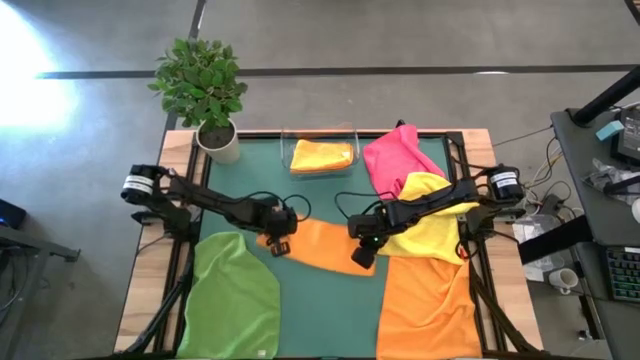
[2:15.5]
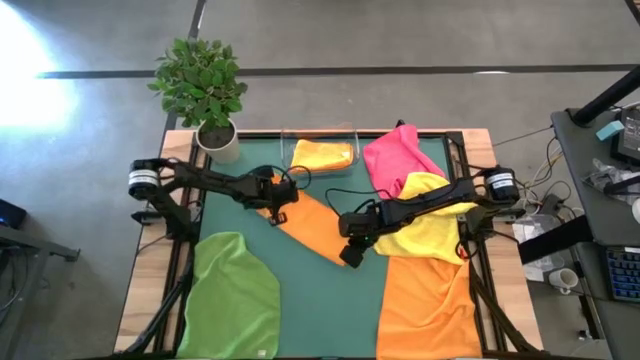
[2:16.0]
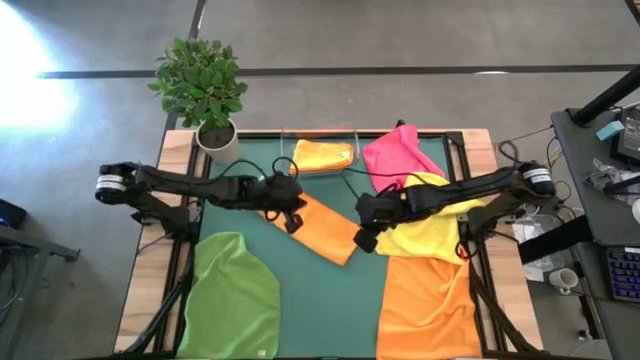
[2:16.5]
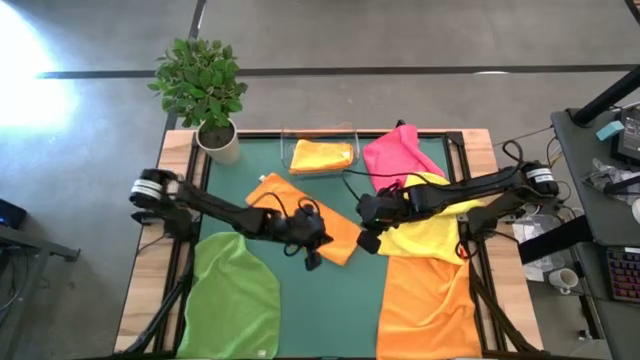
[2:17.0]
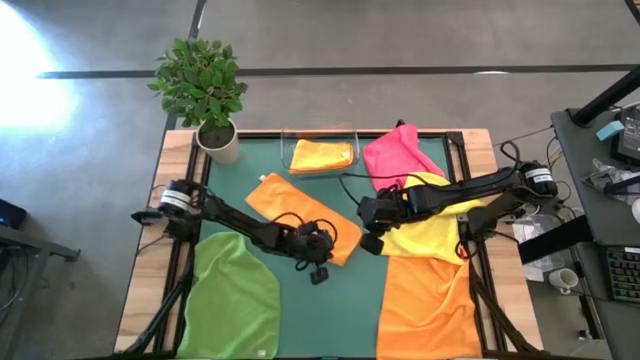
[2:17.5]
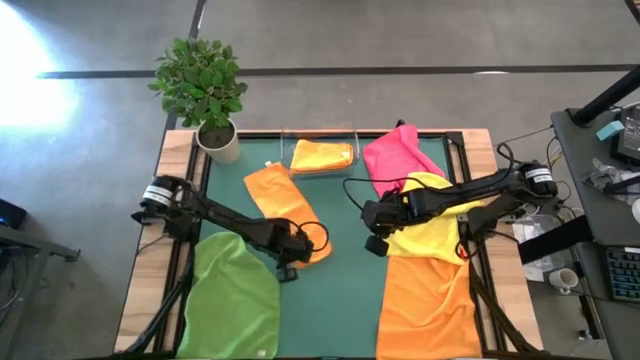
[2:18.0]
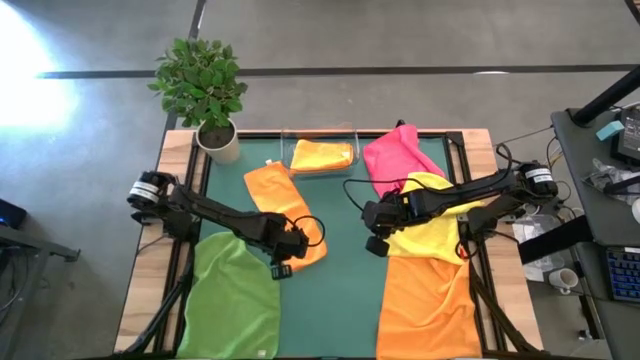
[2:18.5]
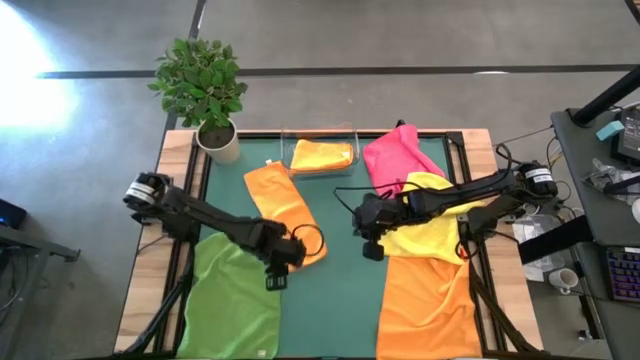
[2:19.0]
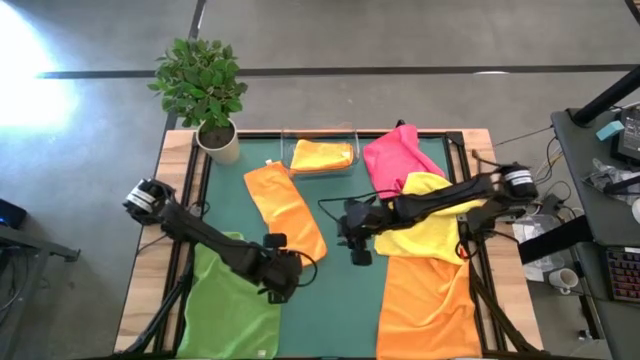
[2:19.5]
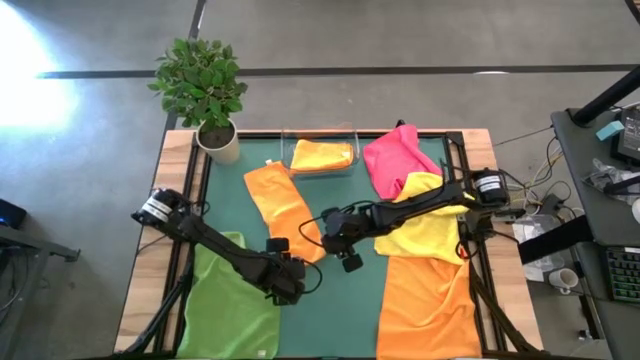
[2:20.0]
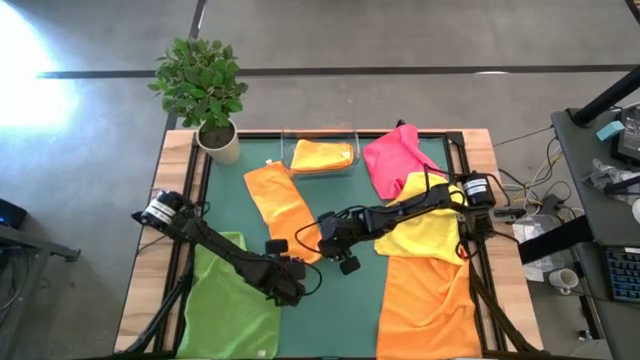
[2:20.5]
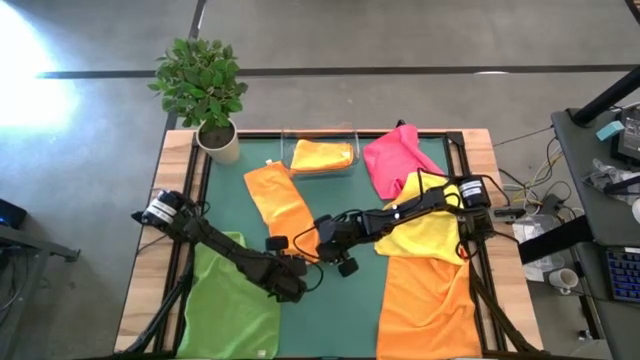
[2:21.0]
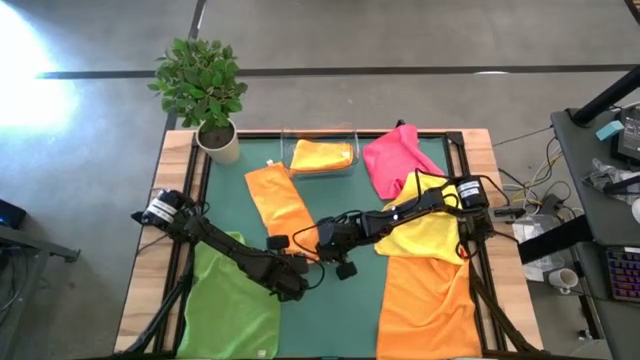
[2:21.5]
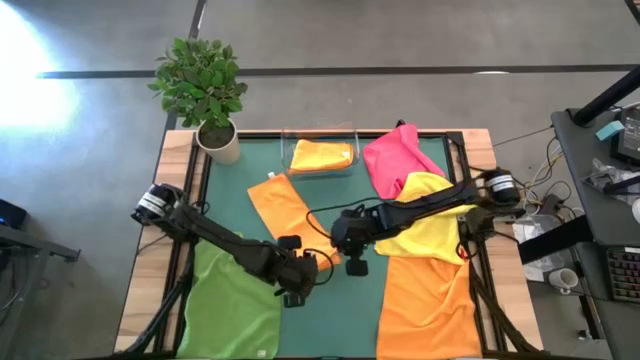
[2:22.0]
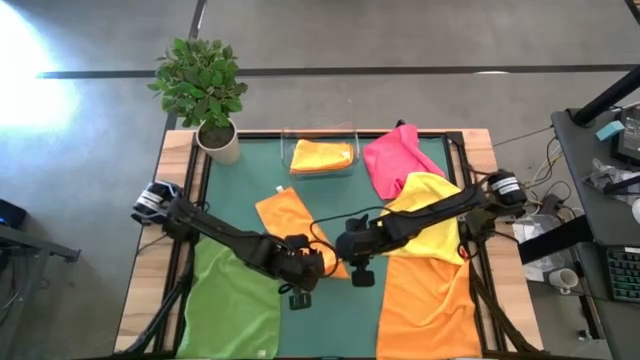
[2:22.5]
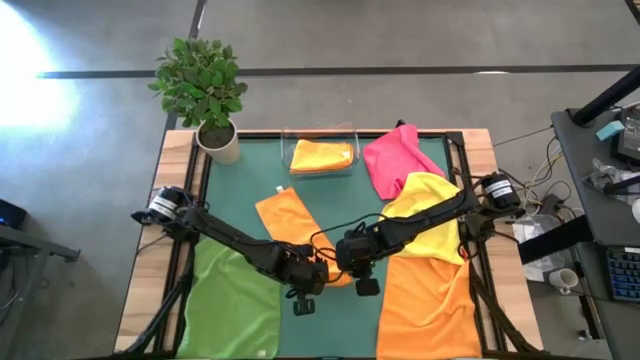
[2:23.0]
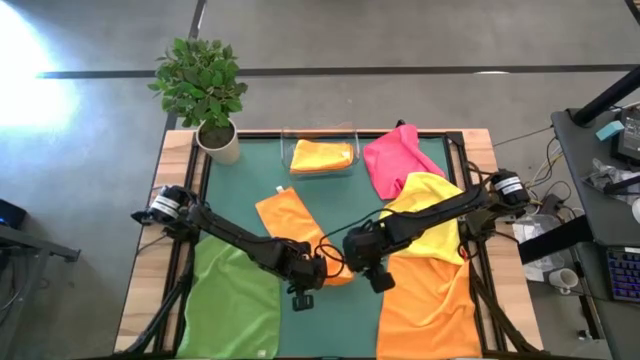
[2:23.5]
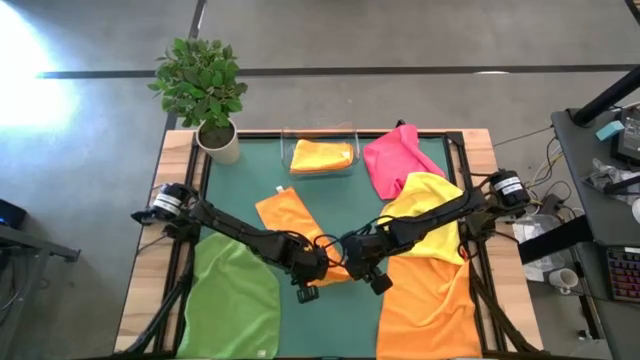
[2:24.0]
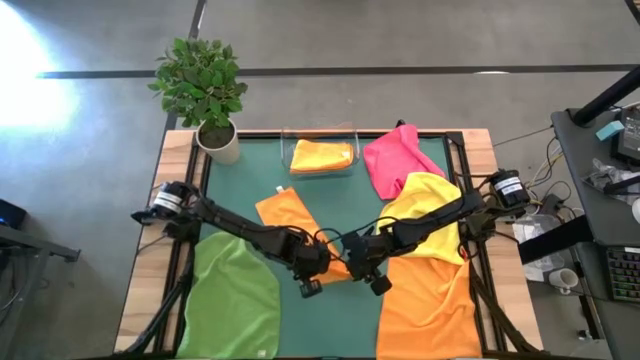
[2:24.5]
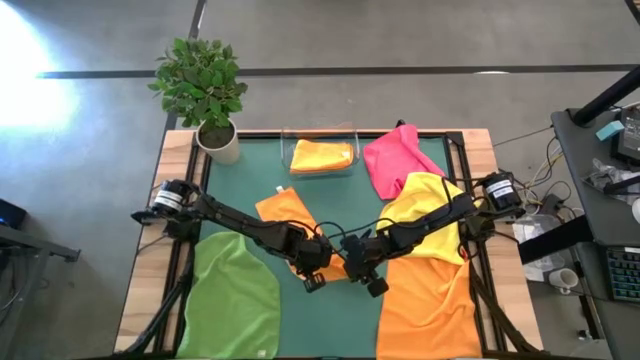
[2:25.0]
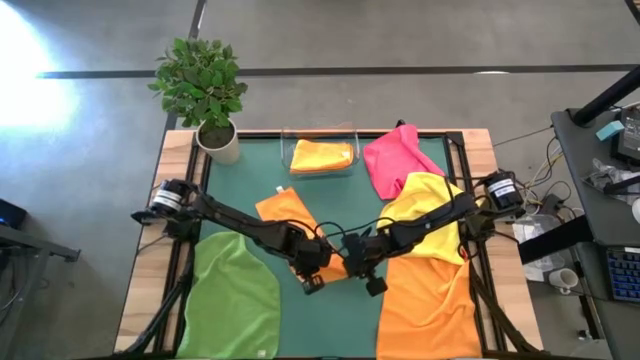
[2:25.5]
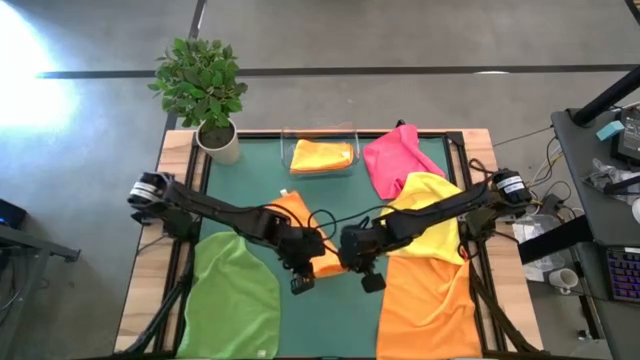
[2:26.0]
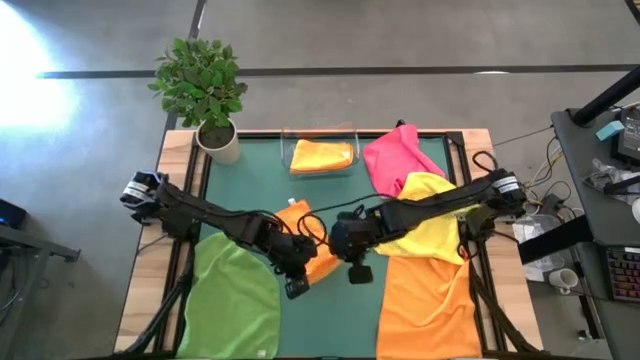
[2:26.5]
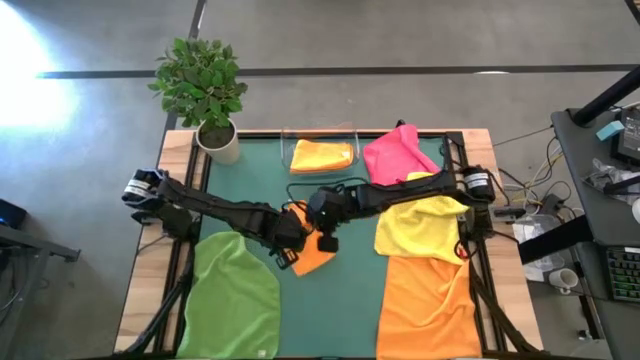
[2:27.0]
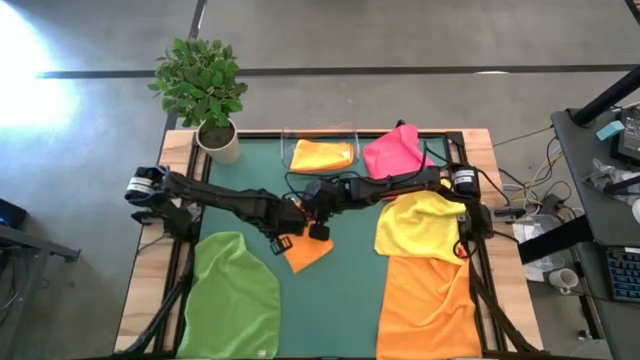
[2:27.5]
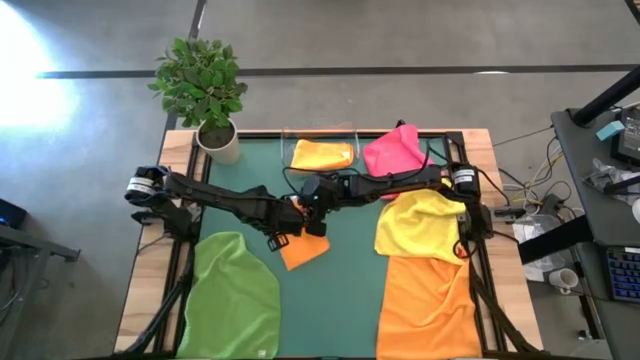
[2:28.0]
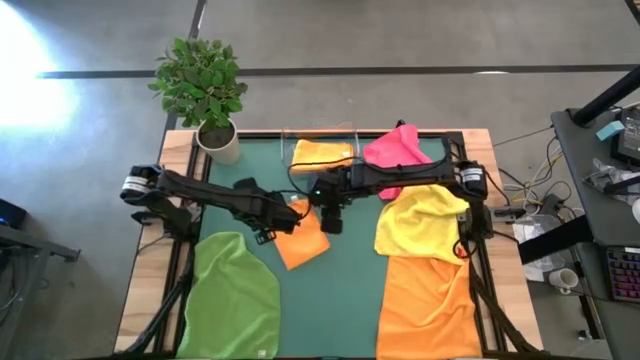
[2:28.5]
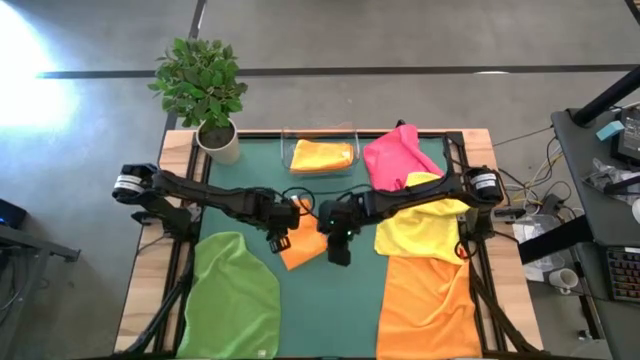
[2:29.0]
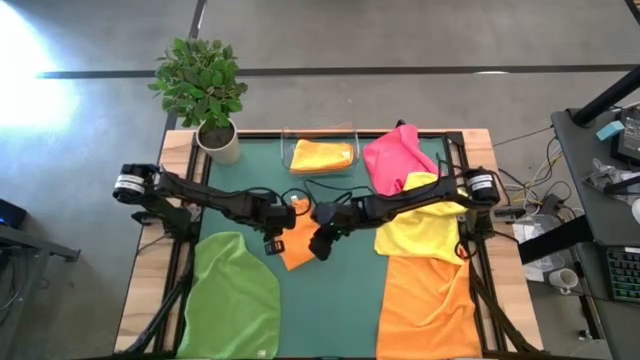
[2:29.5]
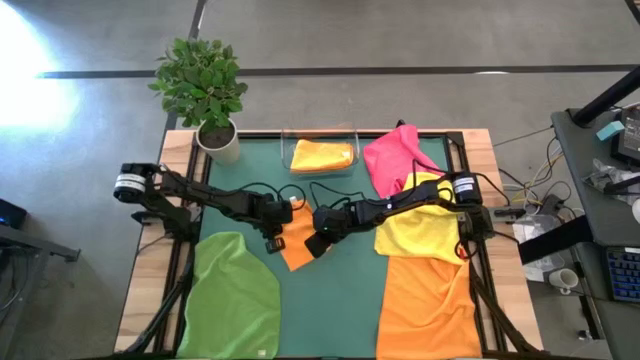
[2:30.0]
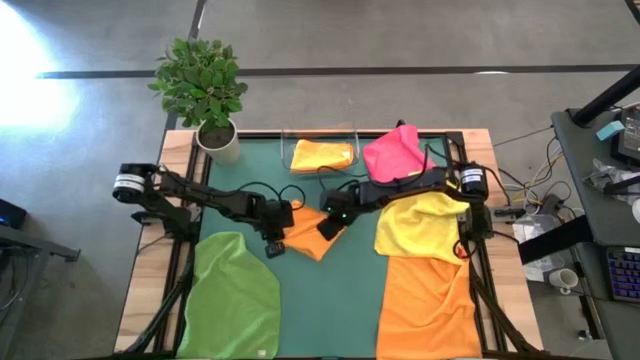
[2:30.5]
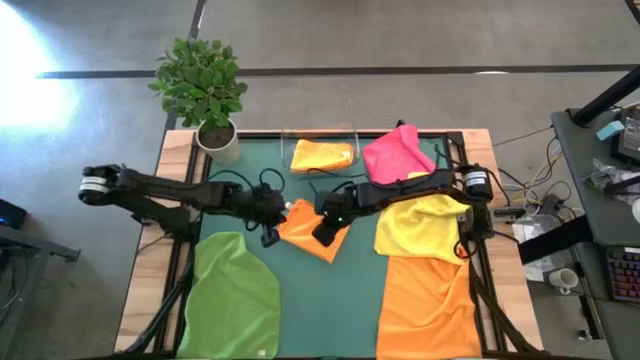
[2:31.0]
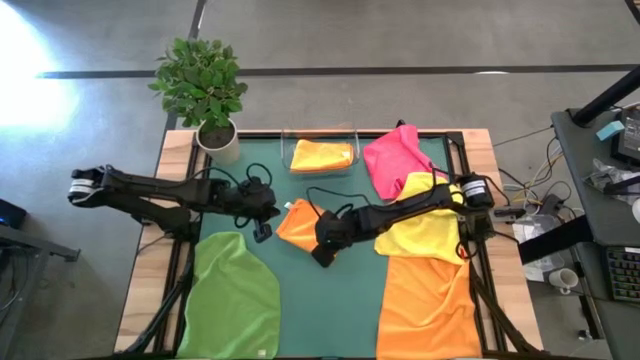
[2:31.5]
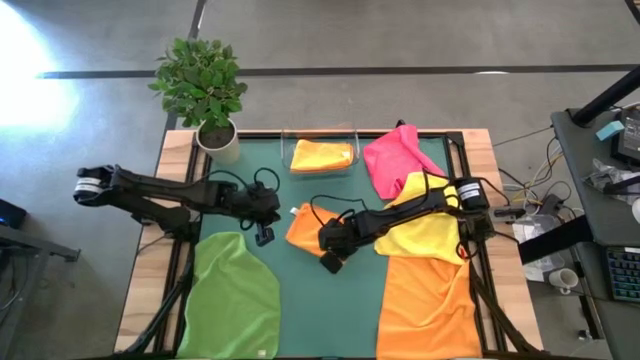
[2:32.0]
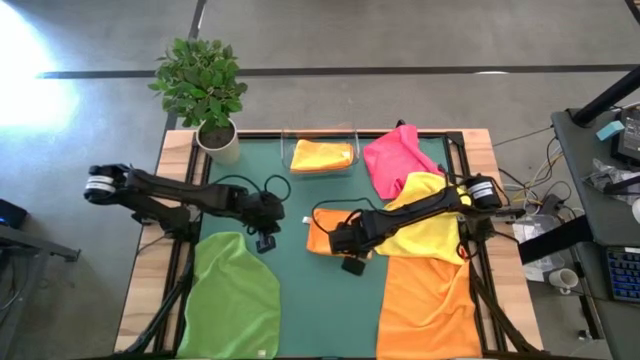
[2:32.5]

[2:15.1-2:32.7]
Task: Fold microfiber towels
Fold the top left orange microfiber towel
